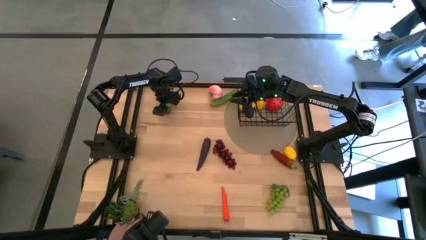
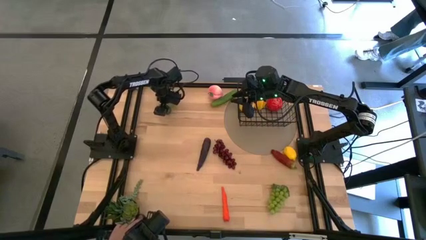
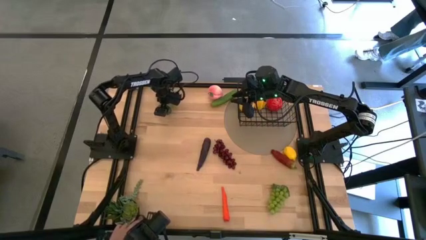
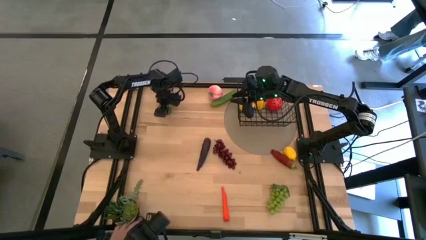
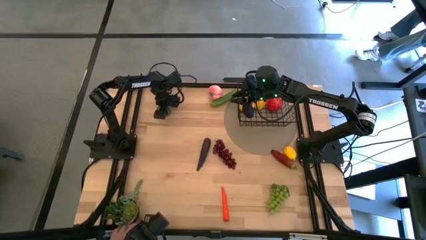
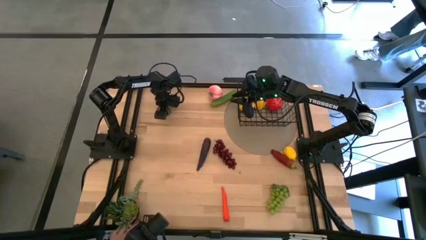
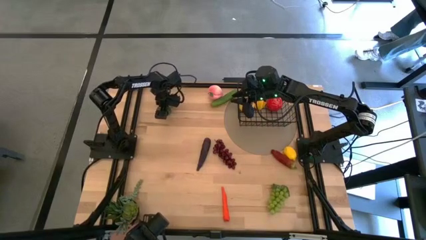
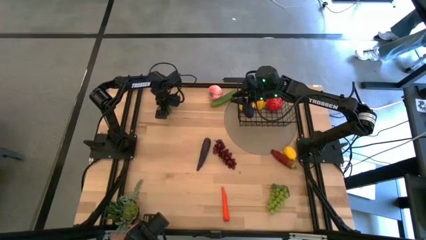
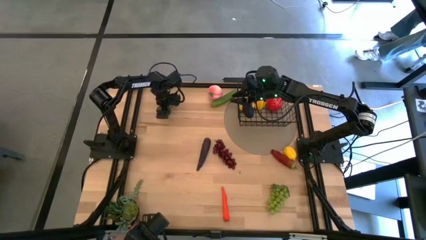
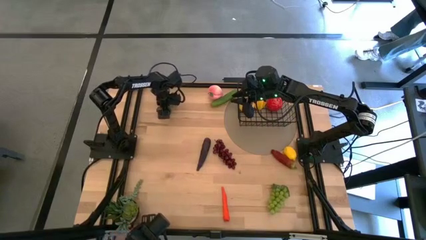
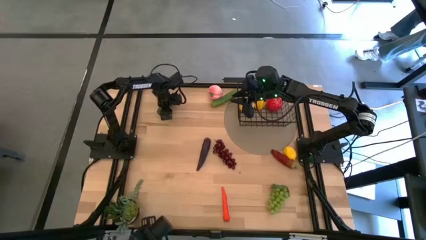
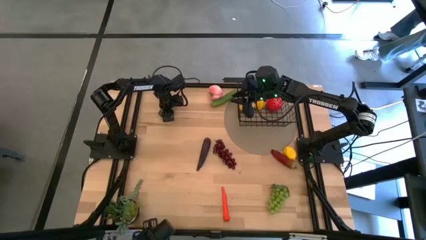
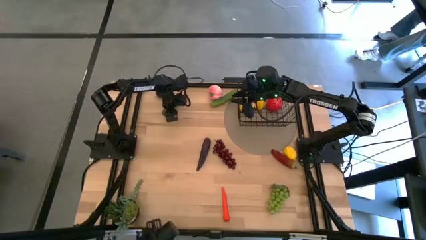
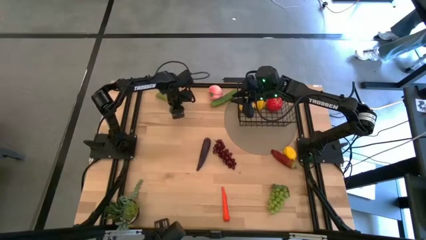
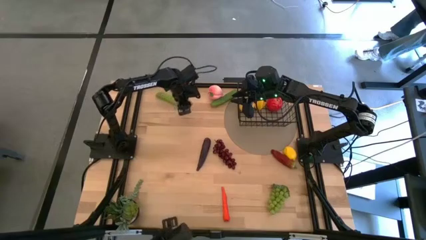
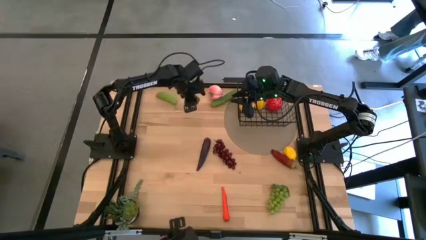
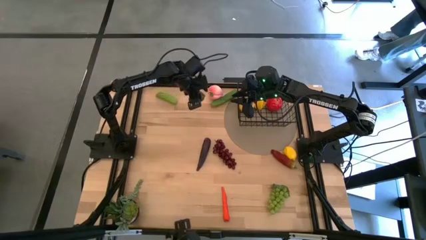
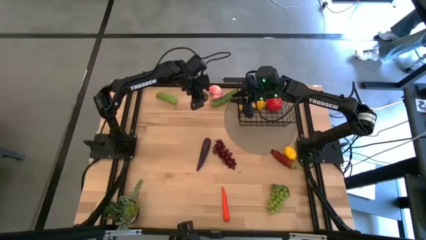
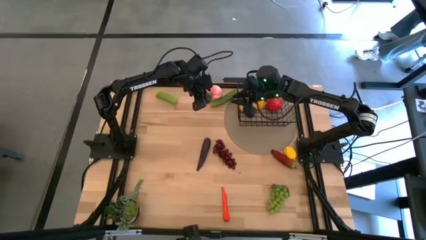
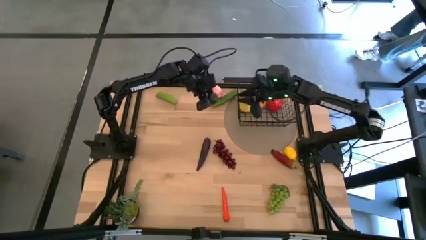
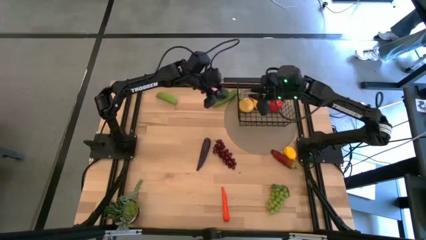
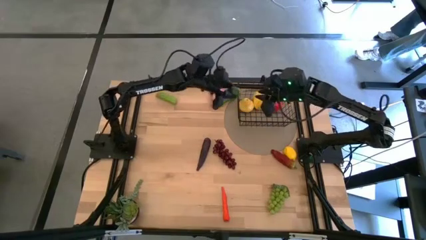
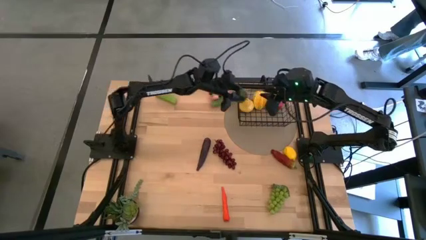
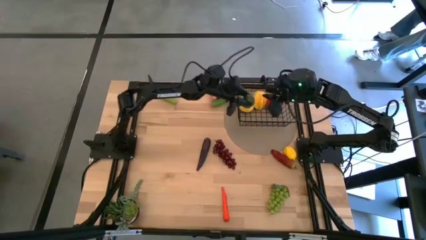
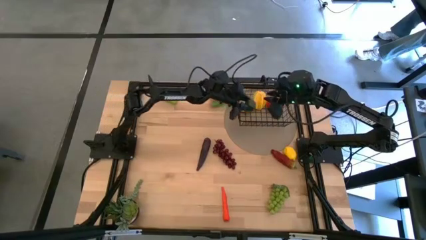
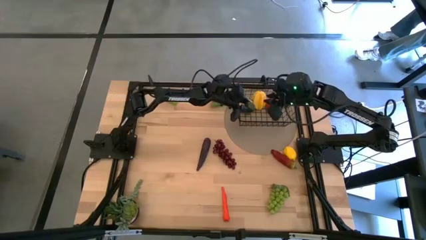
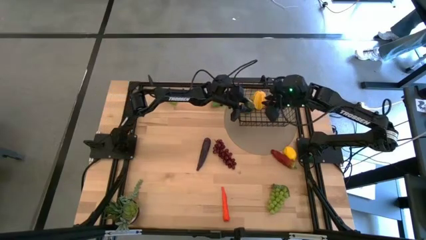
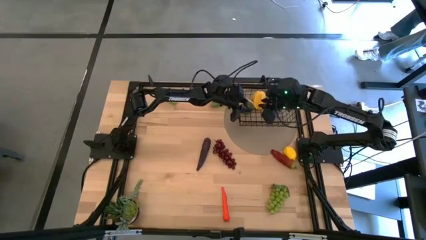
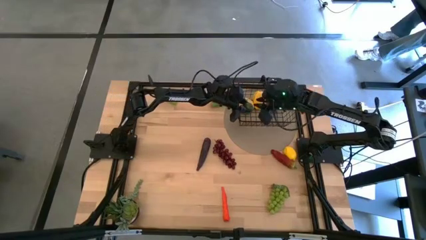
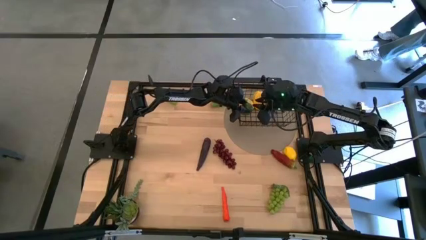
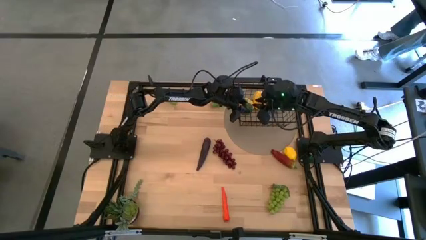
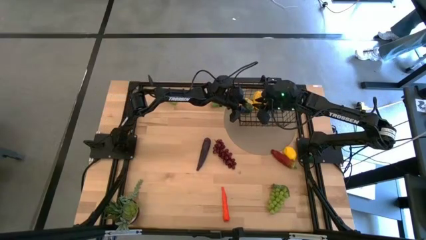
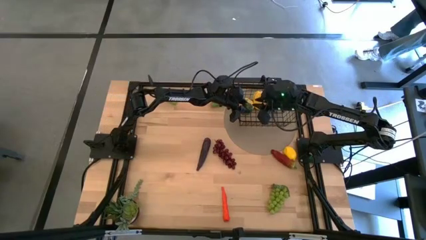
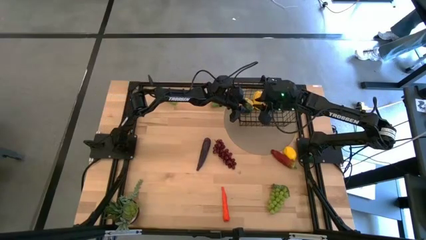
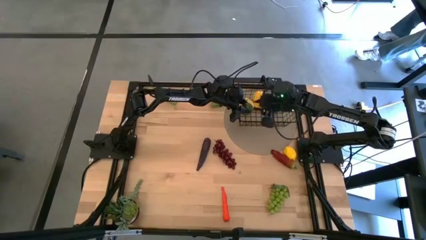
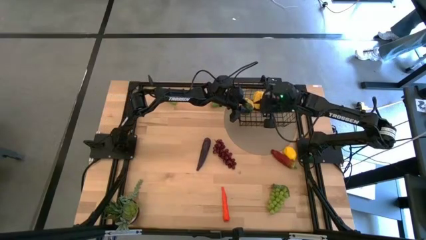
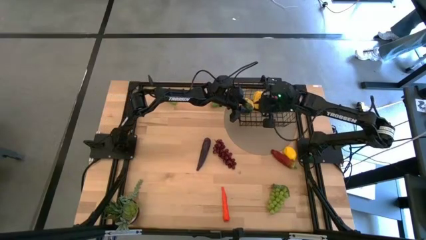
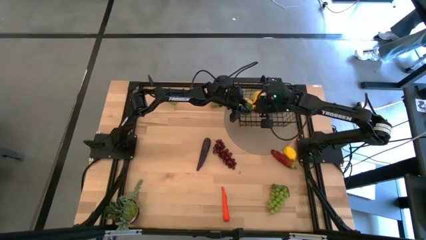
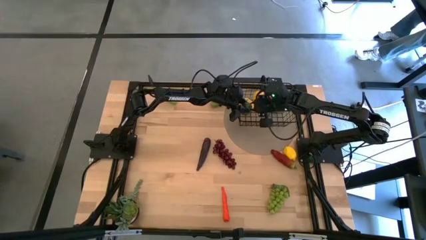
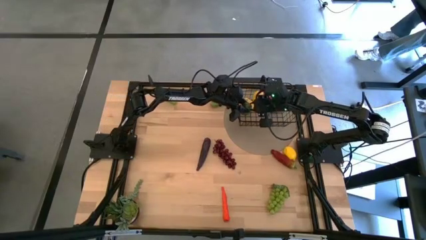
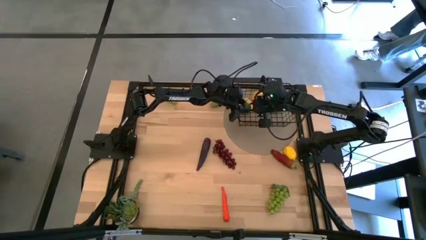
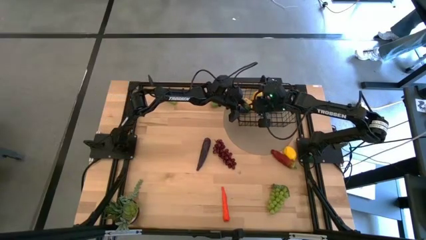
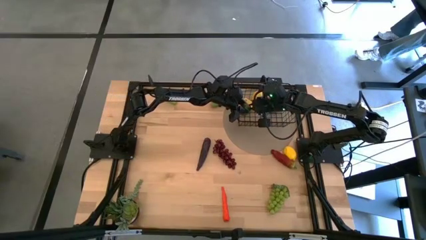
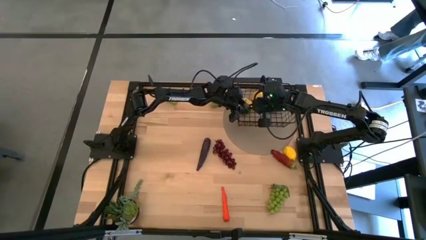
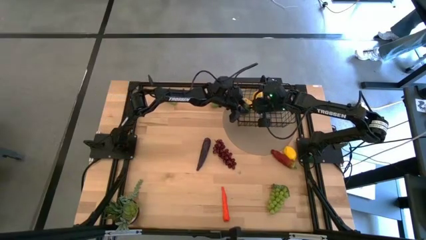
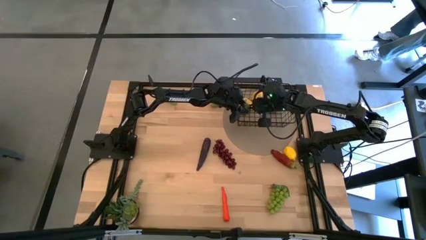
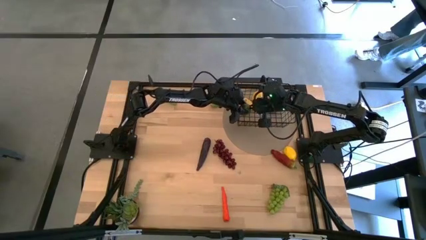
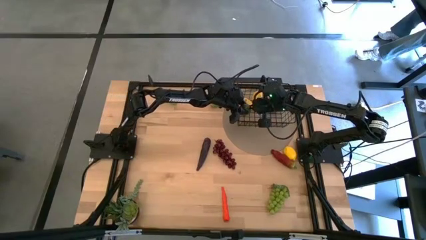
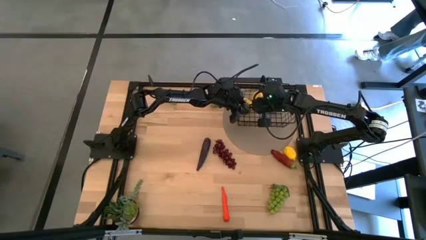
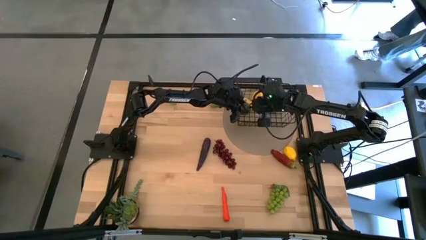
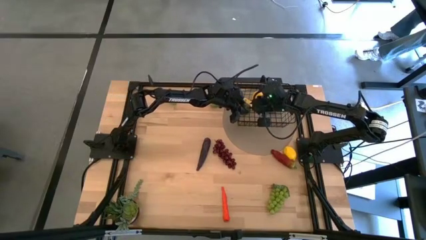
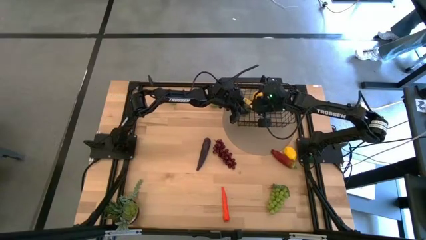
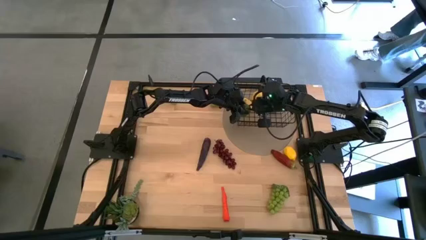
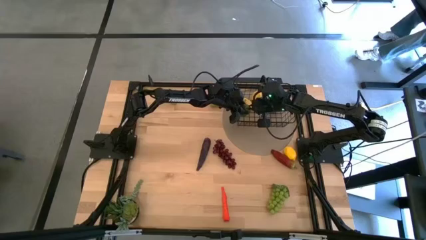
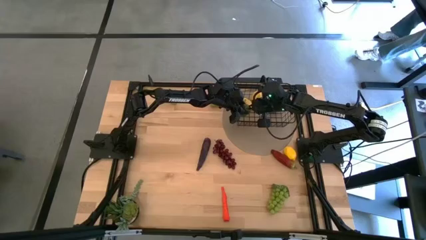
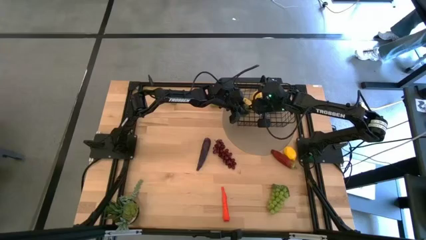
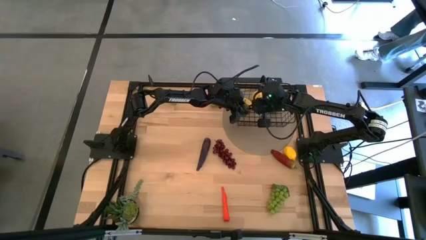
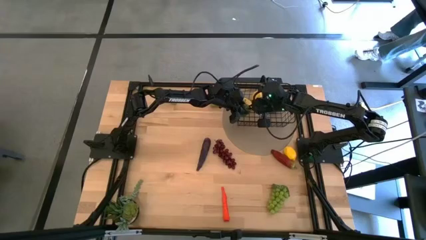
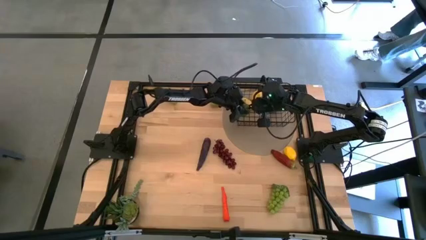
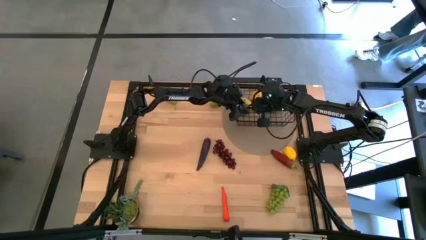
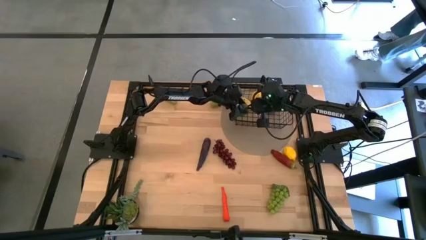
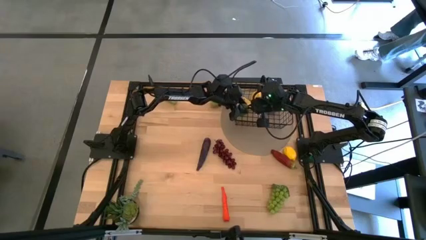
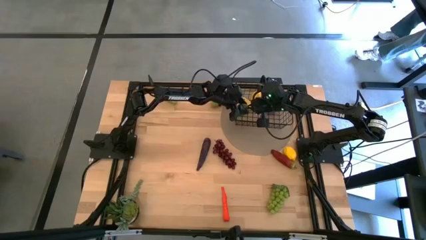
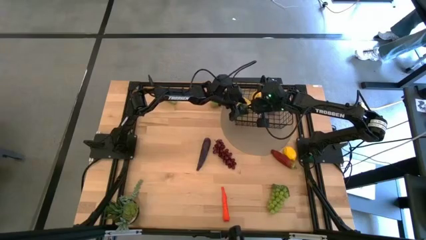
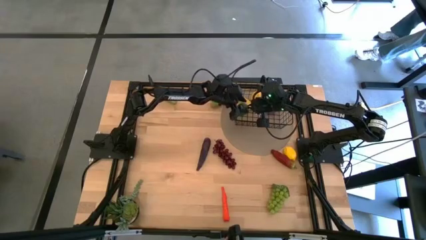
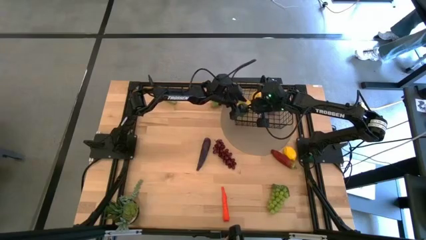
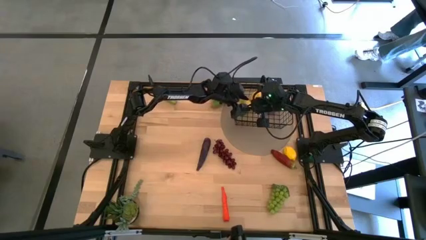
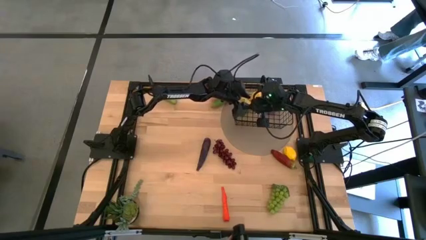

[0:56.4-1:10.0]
Task: Build produce basket
Put the green lime into the black wire basket

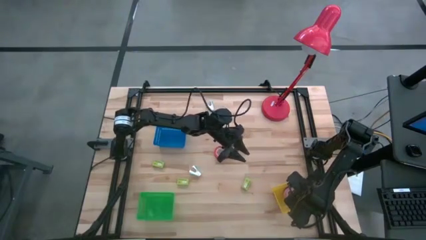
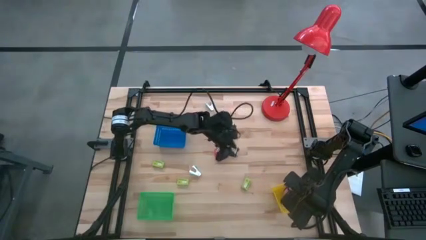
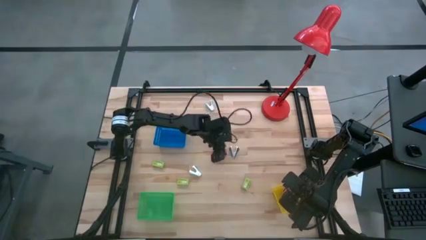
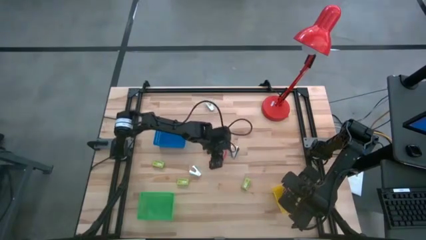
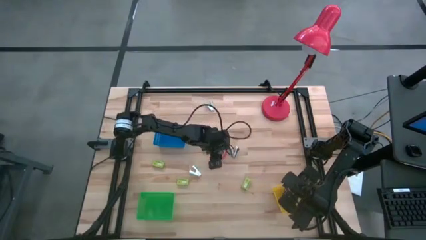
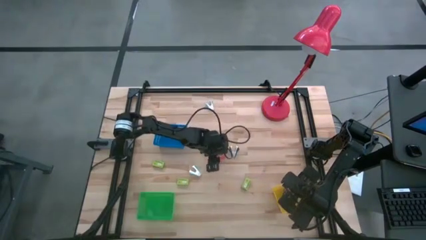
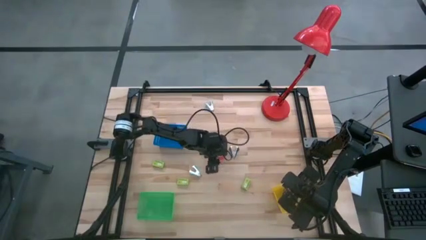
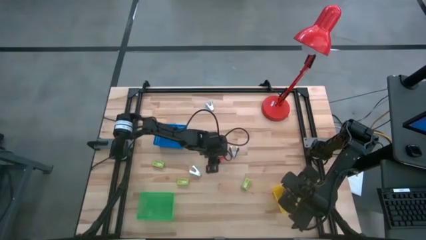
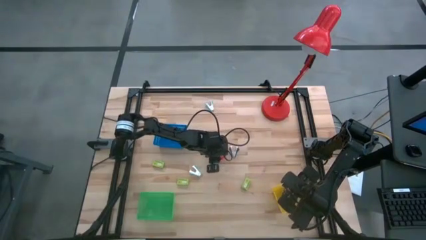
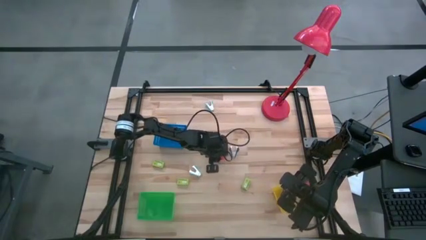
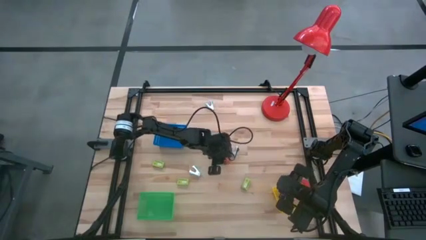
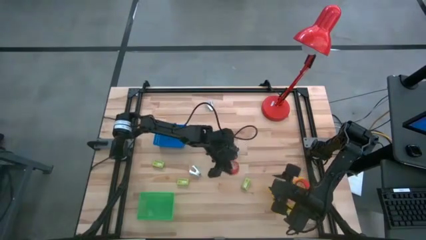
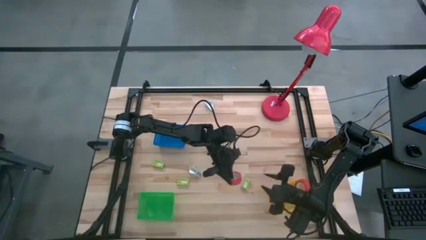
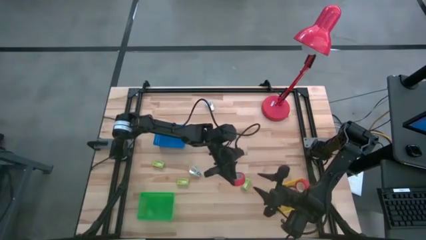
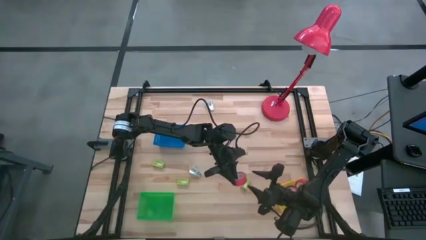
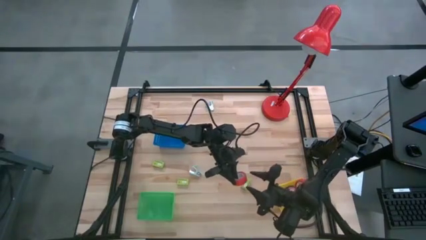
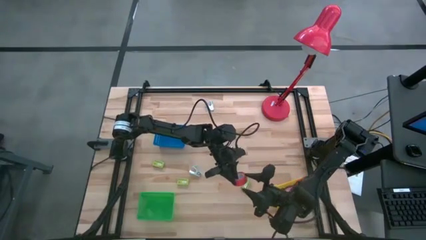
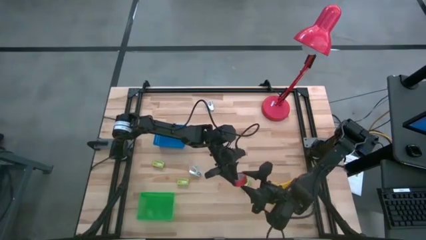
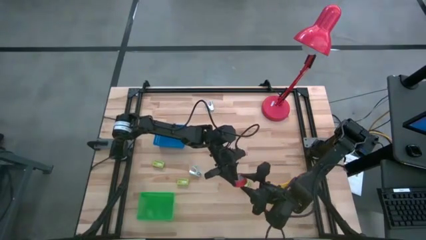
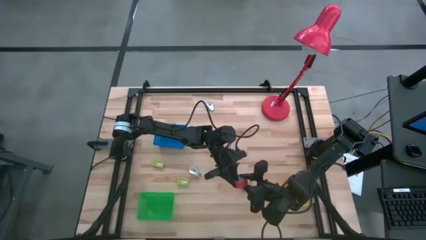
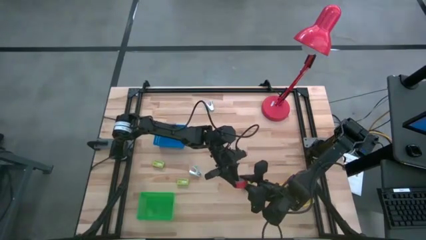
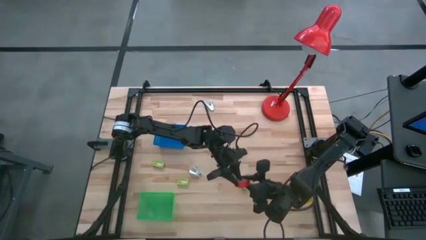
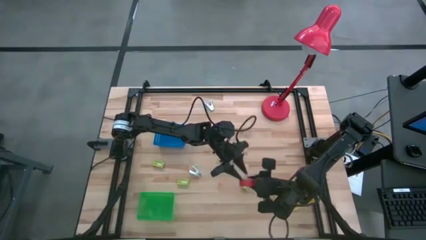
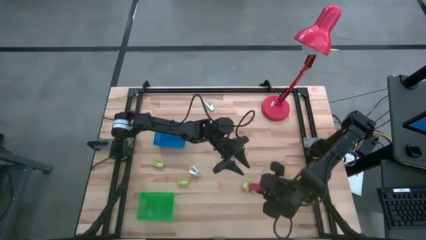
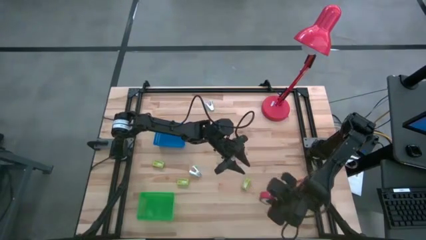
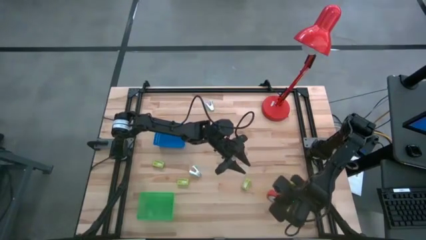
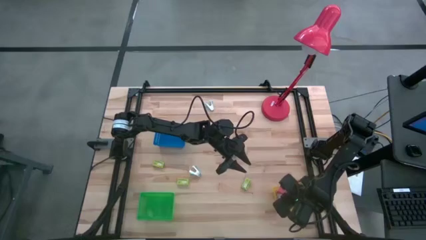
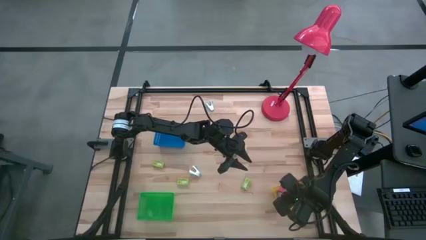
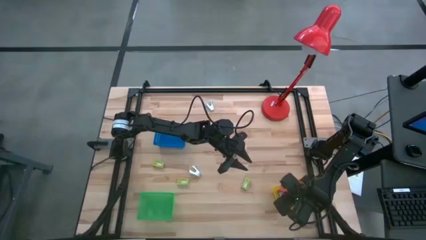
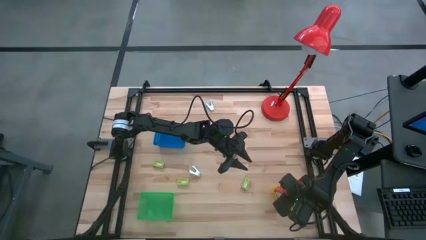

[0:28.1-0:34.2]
Task: Pick and place Stapler, Stapler remover, tape
Put the orange tape into the yellow bin
